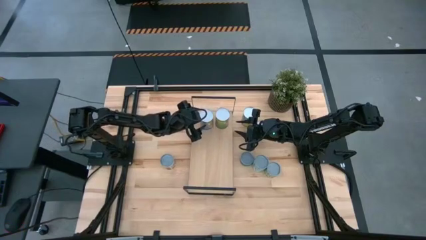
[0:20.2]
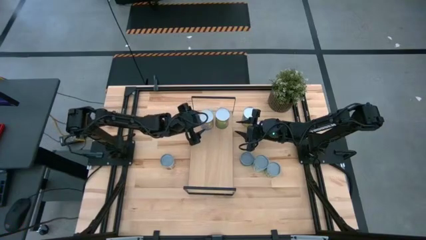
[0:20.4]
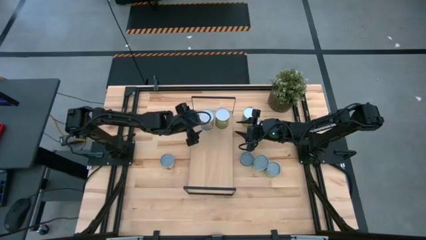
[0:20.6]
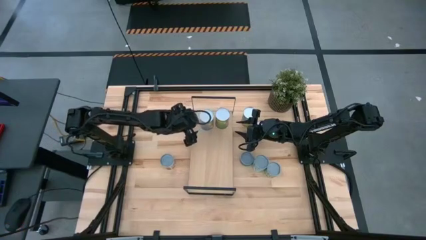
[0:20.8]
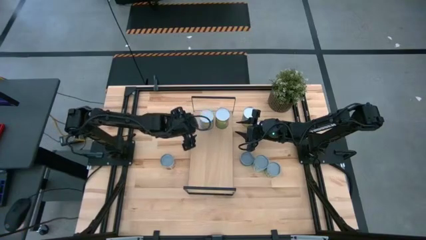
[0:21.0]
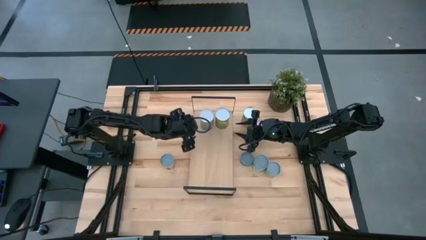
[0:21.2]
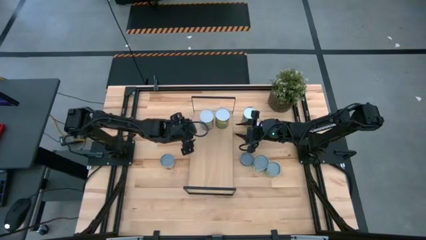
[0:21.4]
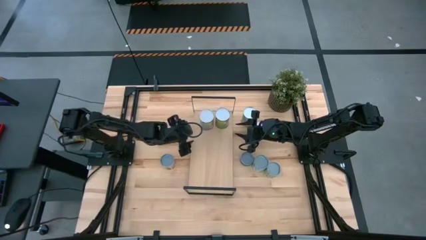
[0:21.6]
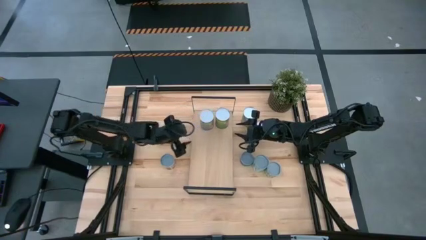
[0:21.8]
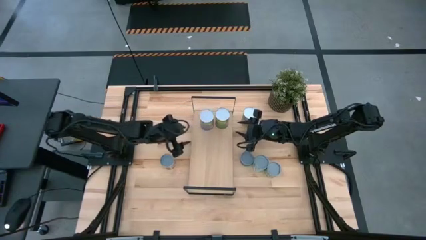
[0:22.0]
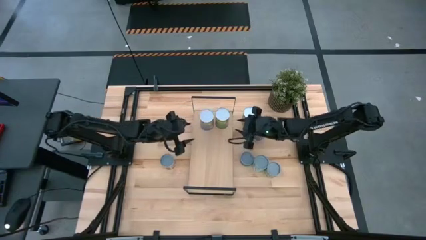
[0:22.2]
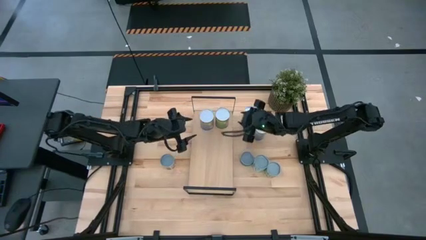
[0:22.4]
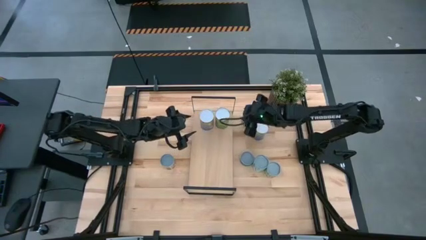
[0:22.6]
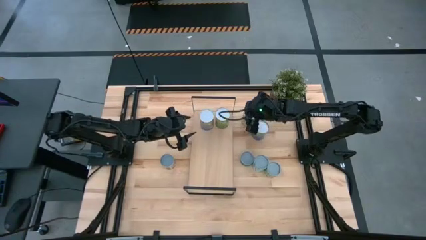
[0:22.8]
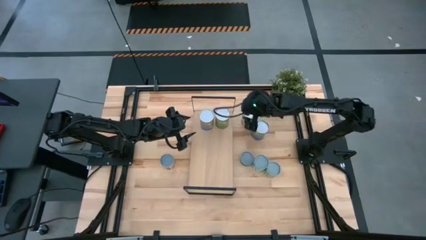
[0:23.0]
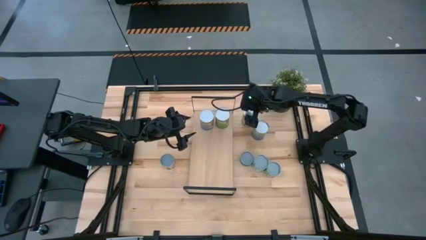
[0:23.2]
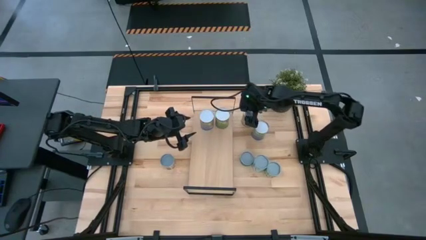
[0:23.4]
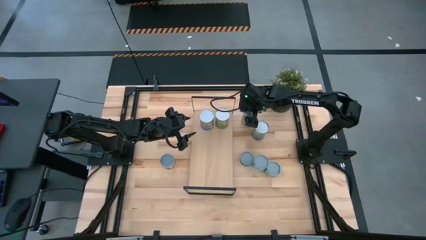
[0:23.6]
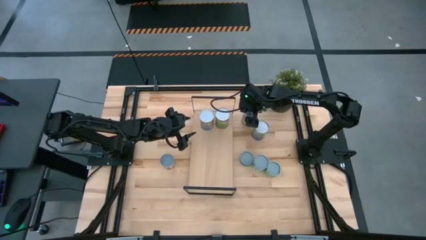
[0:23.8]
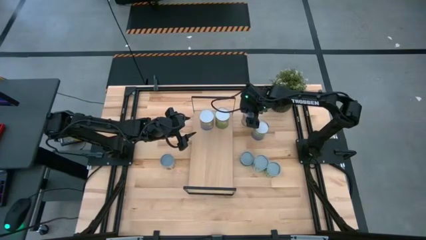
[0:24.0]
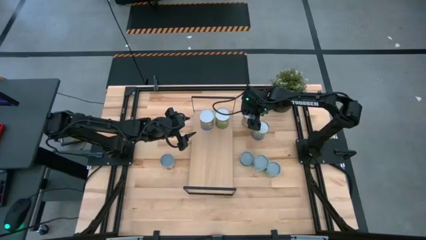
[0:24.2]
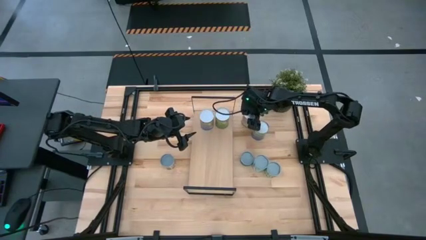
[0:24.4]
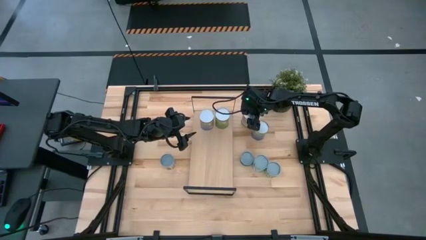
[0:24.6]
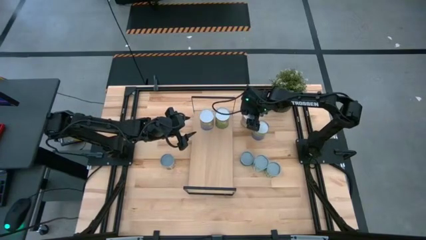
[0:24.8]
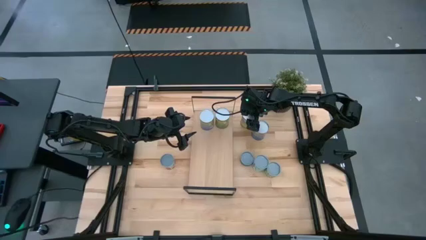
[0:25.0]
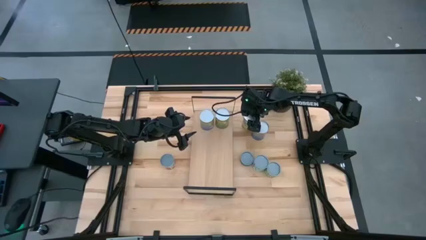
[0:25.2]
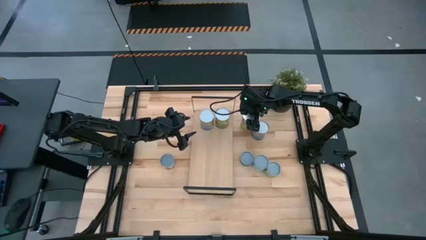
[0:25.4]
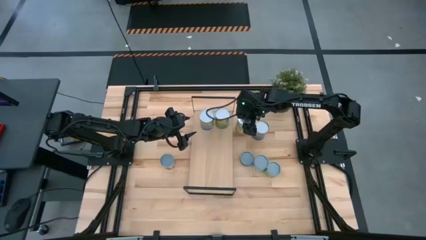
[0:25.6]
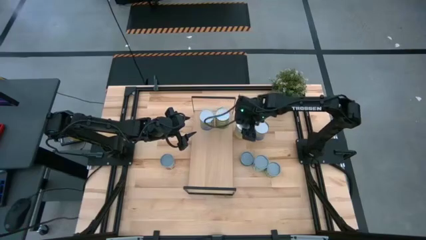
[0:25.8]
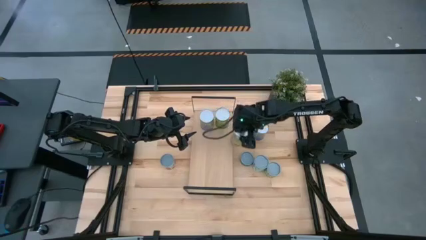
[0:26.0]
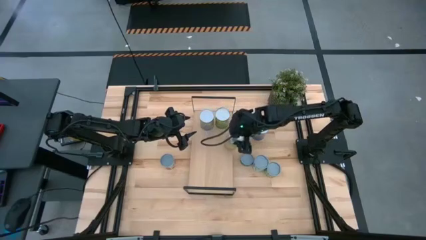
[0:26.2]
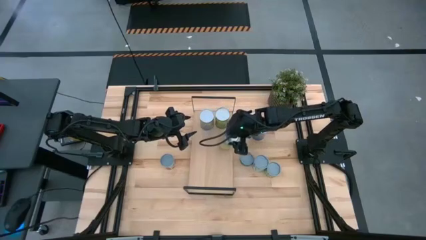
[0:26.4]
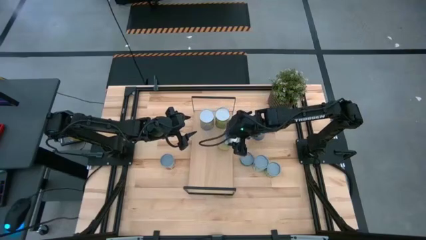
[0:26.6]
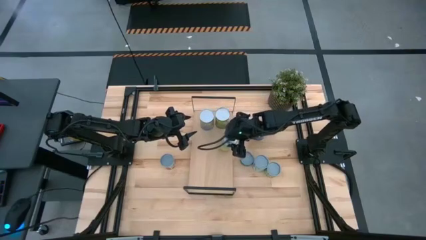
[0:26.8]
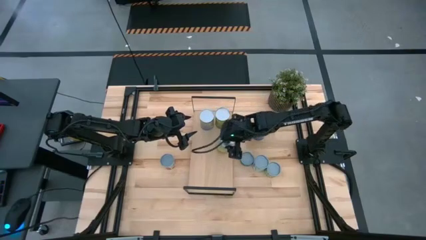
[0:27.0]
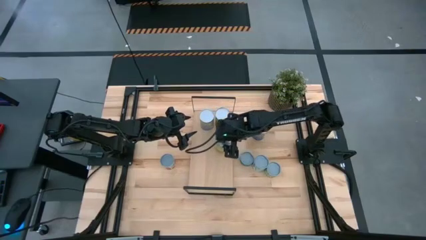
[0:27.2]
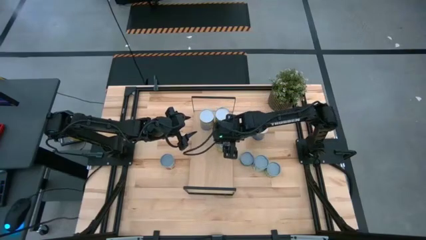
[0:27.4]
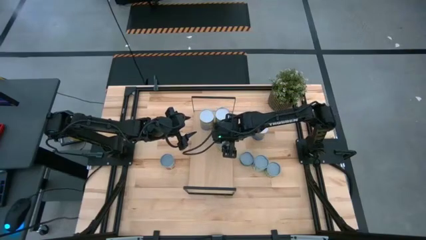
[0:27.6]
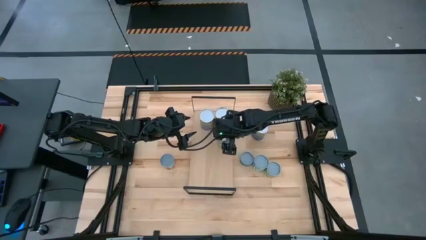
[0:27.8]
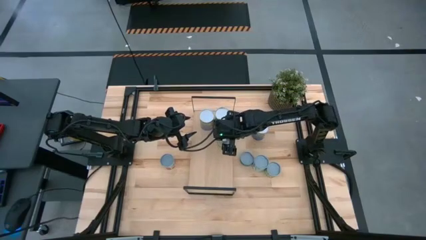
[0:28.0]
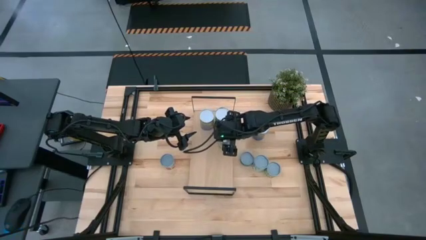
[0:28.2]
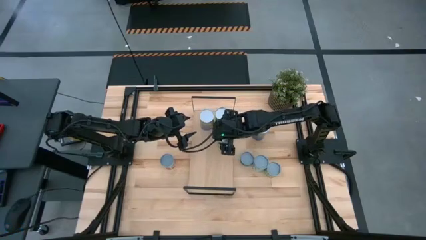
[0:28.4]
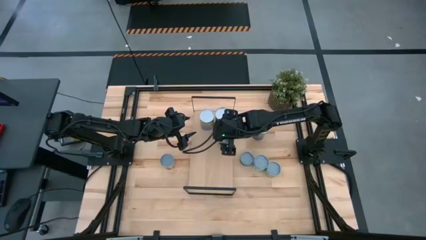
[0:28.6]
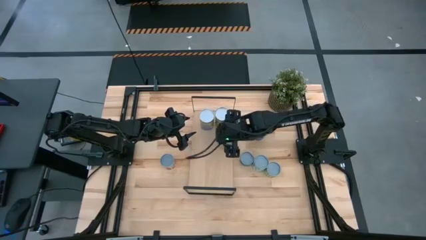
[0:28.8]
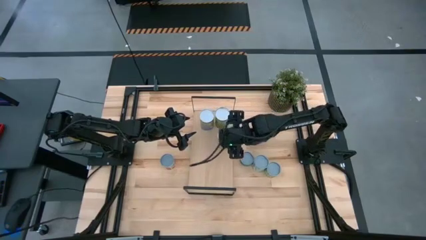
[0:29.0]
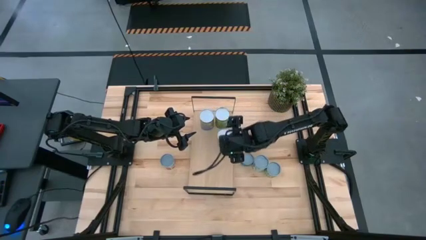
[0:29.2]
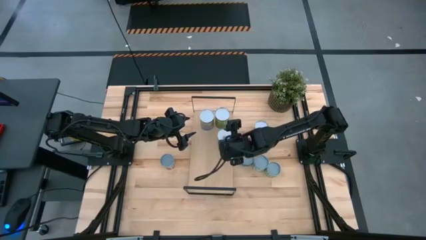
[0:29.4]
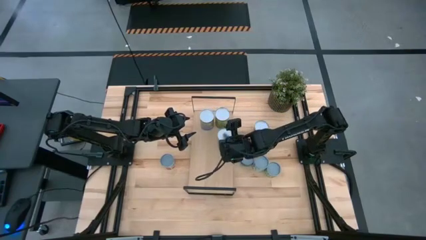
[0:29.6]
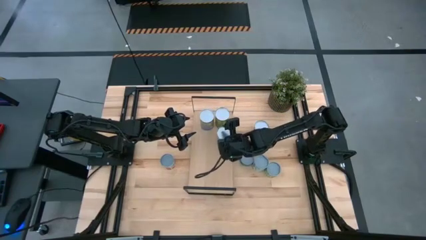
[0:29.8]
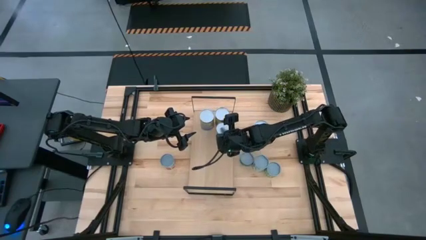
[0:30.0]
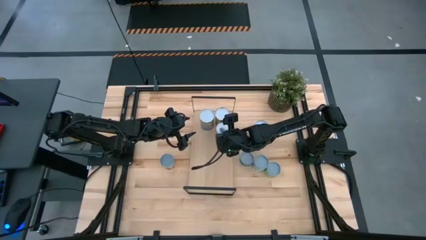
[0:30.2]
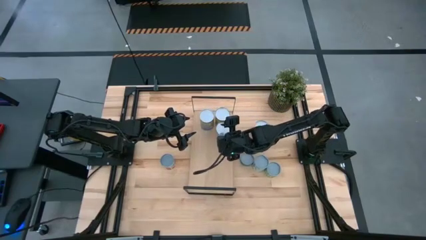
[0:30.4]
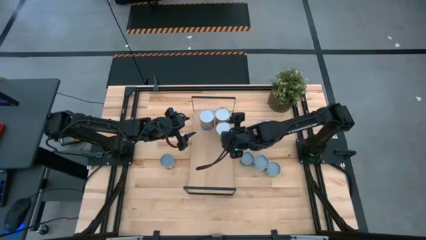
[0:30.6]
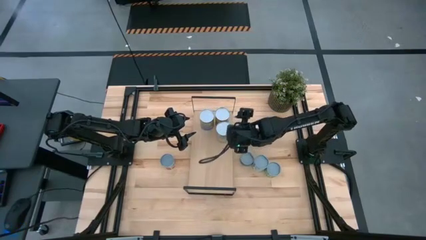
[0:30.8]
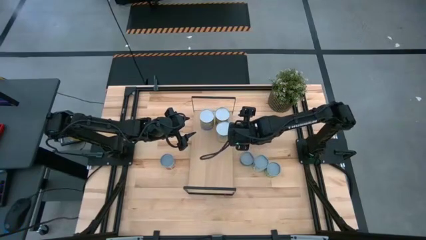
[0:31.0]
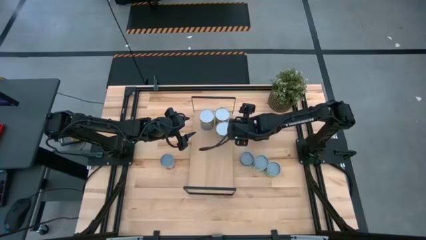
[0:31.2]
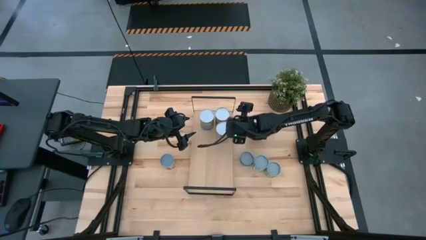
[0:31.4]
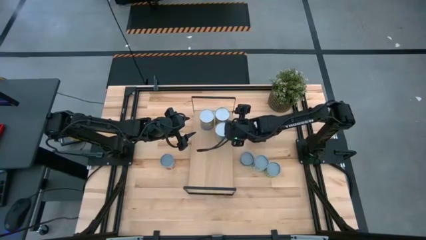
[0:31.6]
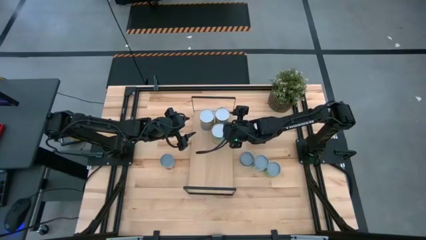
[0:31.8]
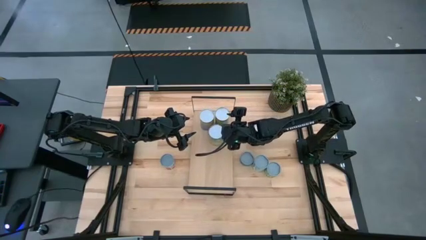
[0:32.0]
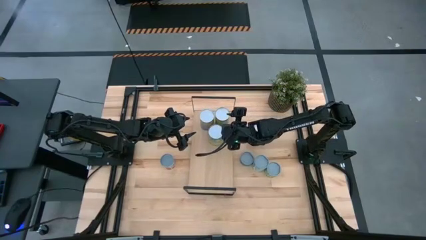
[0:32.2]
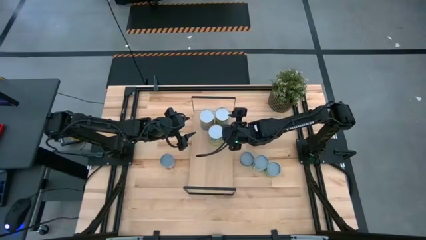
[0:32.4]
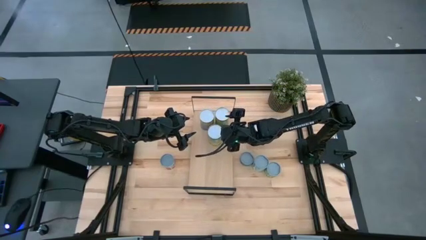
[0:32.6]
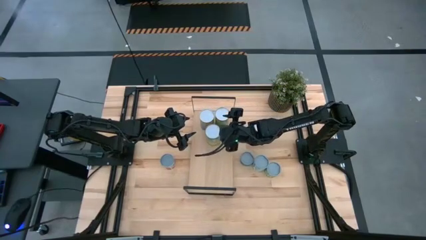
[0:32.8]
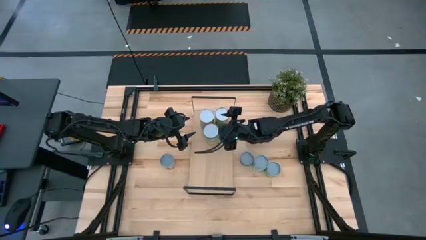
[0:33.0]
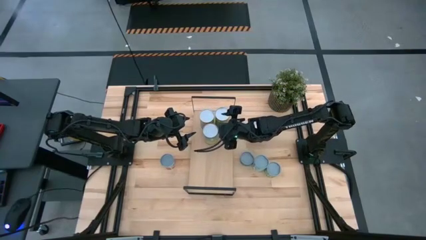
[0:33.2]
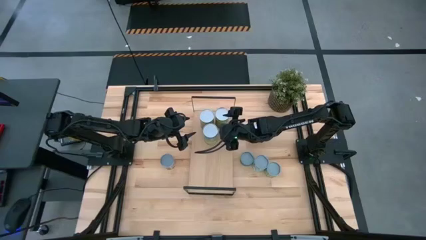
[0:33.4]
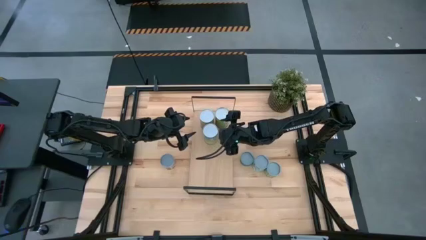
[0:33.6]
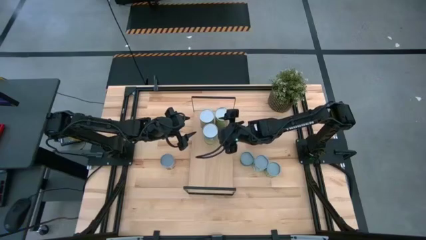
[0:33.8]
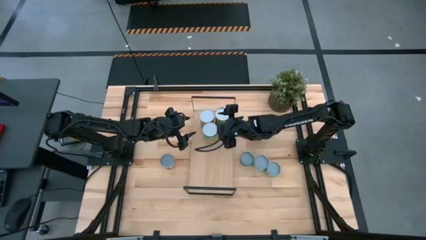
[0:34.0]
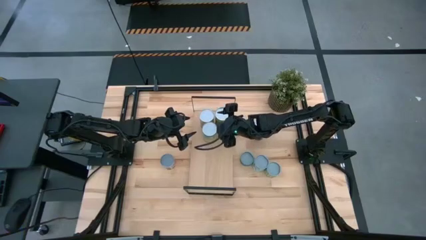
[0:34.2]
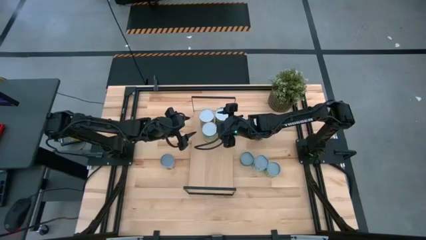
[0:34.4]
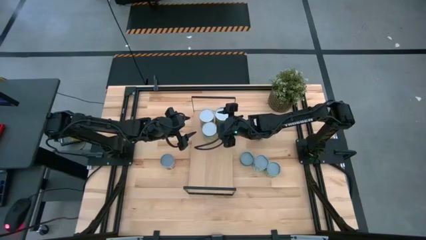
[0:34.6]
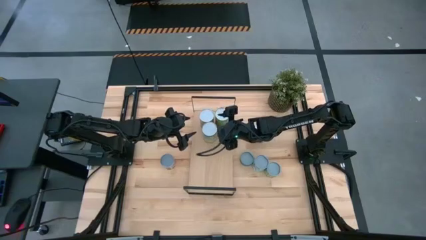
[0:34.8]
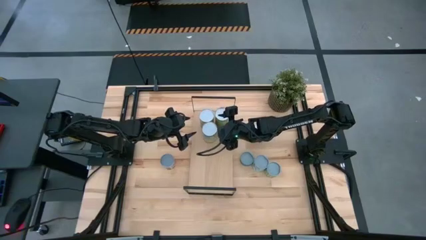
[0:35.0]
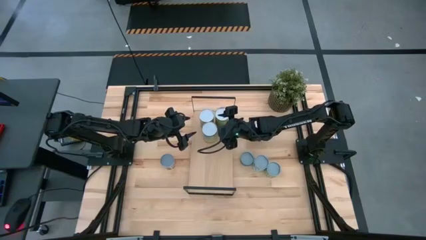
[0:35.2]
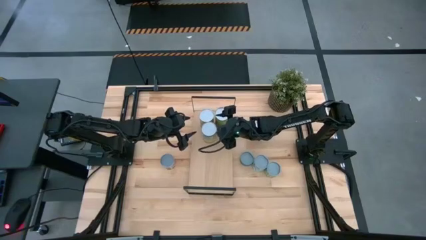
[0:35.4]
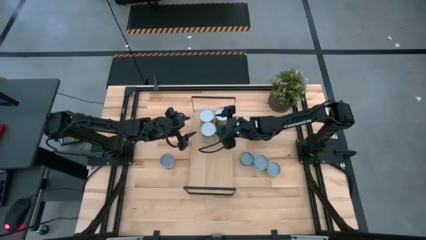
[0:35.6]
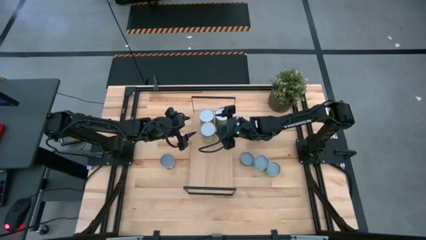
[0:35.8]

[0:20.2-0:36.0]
Task: Pick and place cans onto a shelf
Put the canned carrots on the shelf
